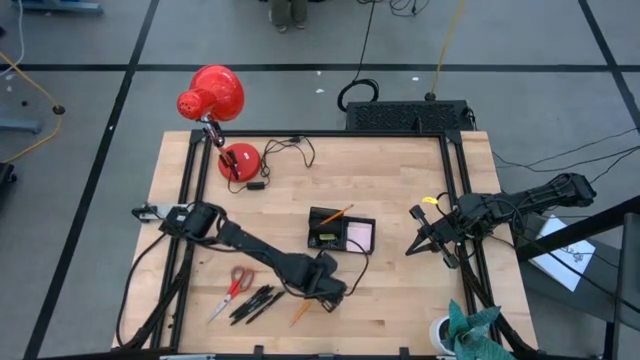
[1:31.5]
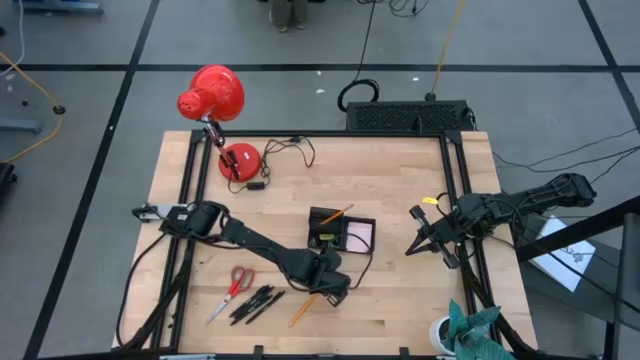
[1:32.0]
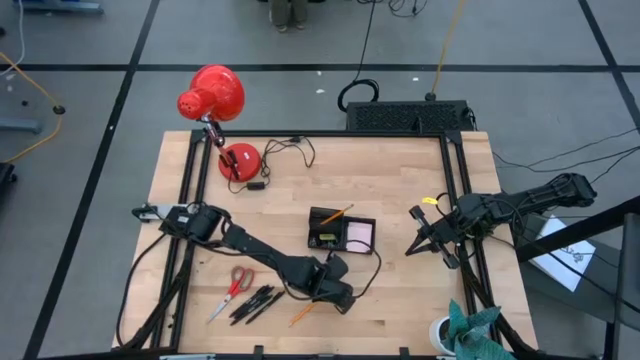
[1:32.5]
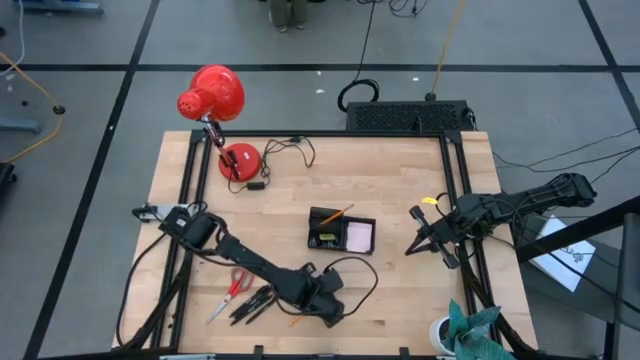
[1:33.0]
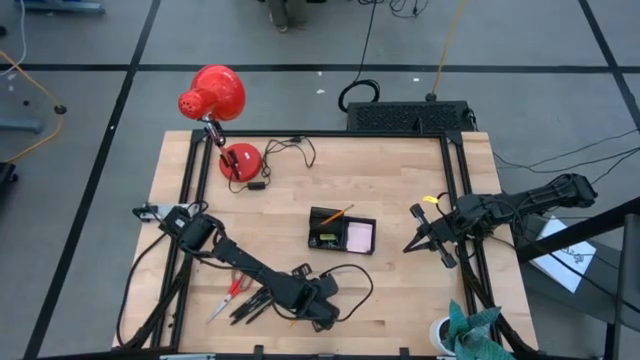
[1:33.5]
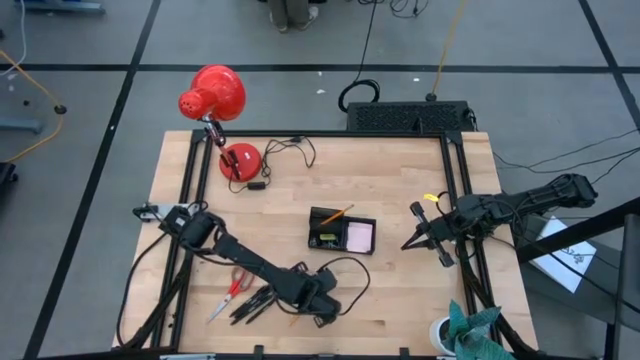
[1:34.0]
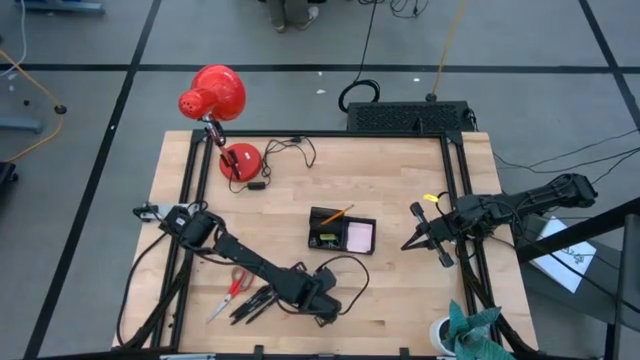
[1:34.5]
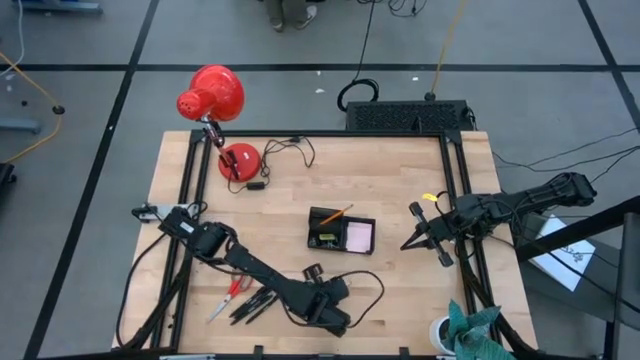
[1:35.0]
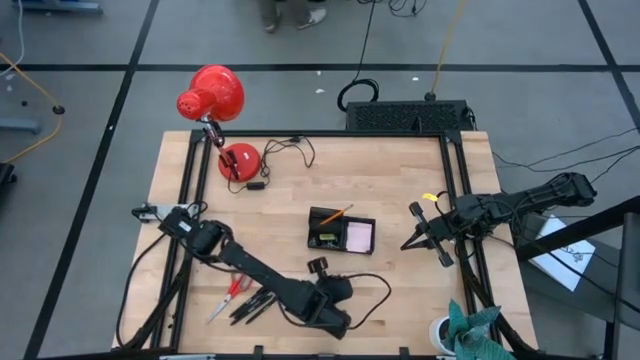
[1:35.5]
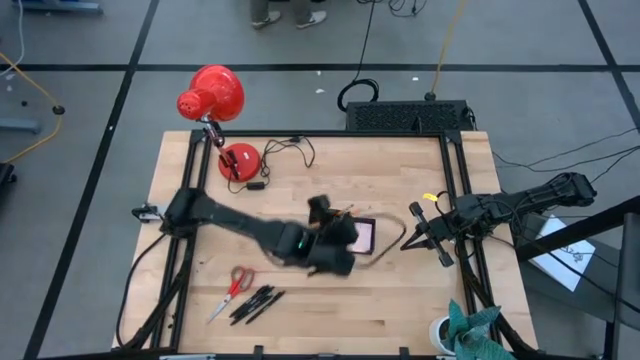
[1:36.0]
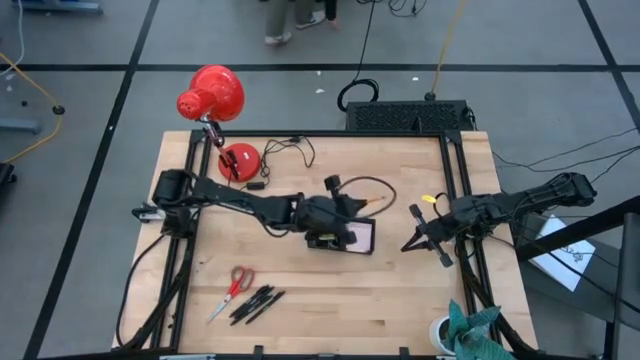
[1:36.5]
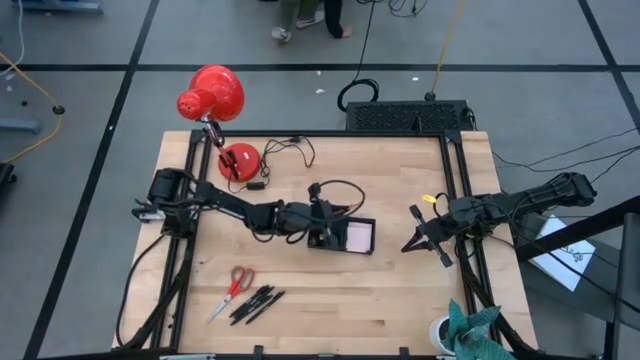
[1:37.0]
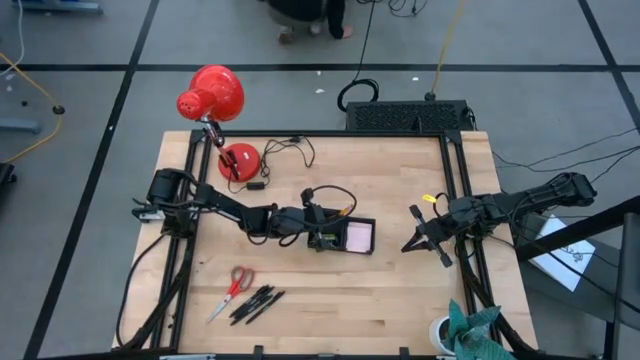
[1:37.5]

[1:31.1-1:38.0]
Task: Pick and place office supplies into organizer
Put the orange pencil into the desk organizer

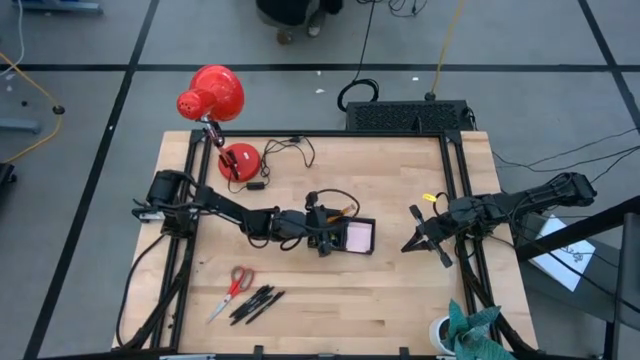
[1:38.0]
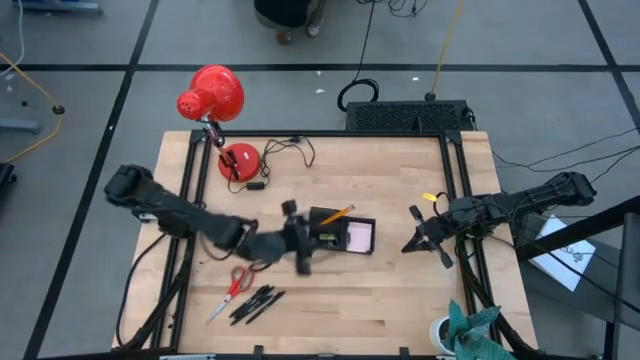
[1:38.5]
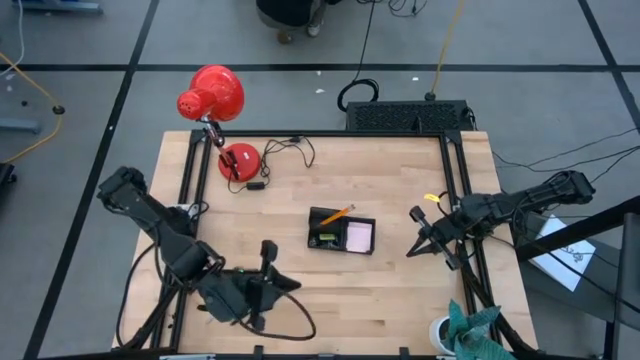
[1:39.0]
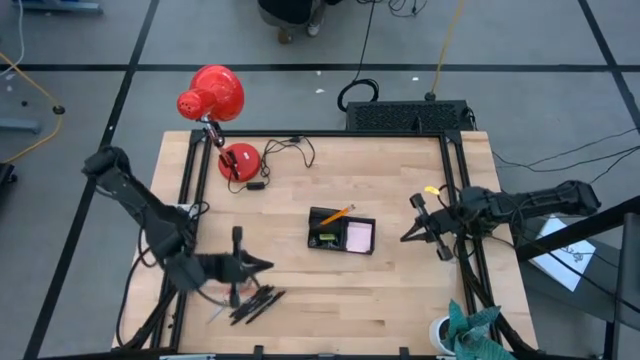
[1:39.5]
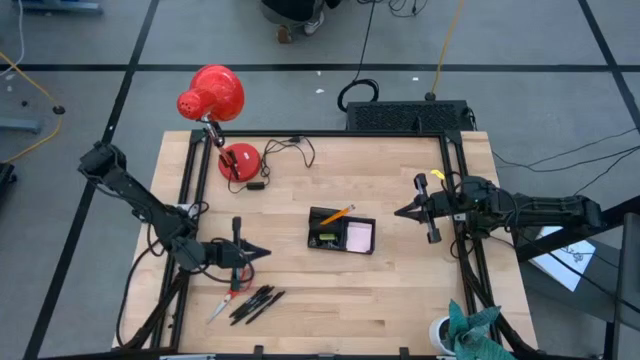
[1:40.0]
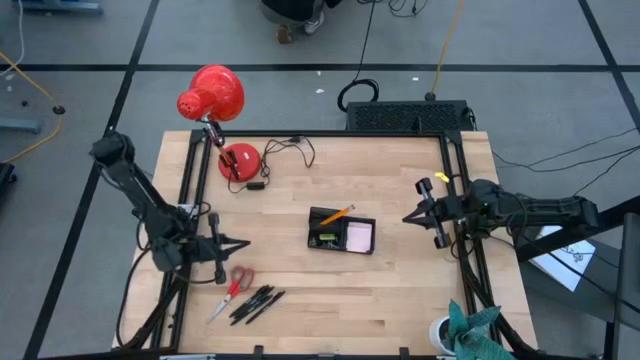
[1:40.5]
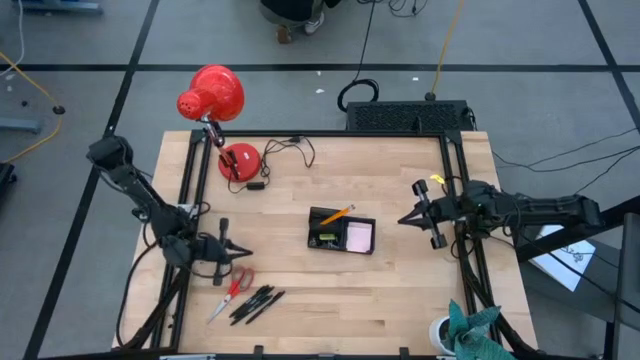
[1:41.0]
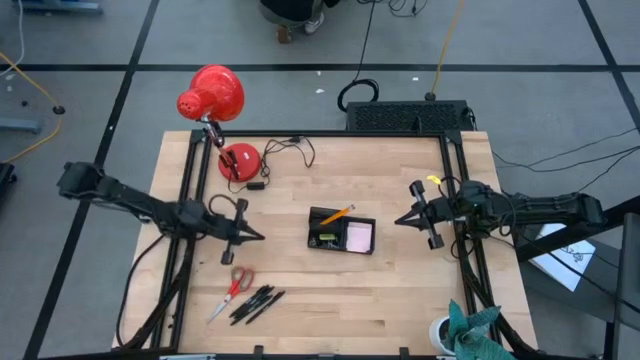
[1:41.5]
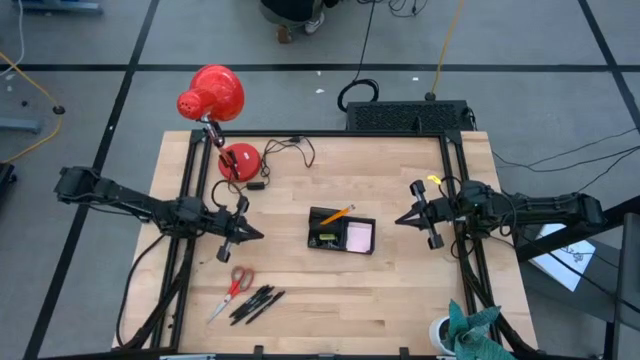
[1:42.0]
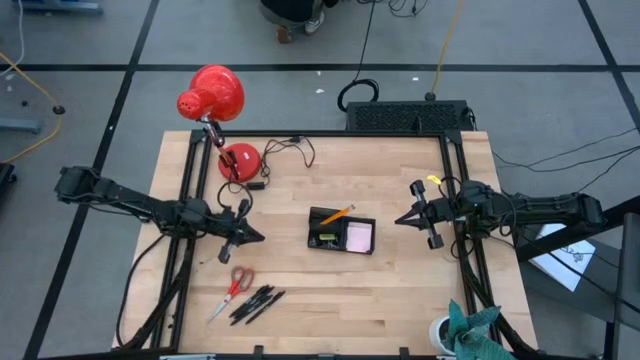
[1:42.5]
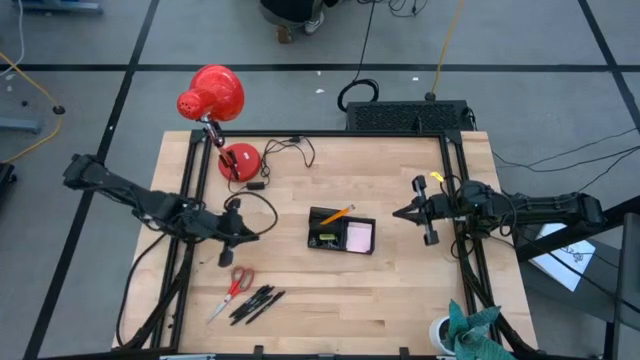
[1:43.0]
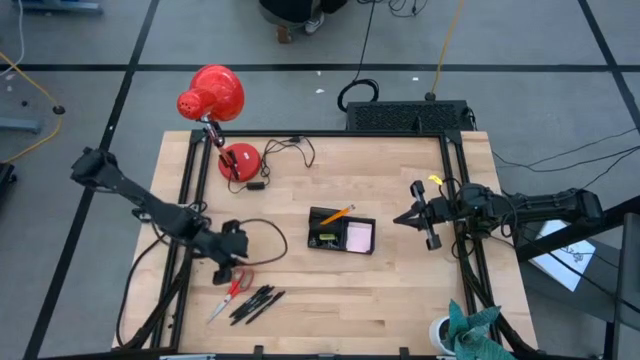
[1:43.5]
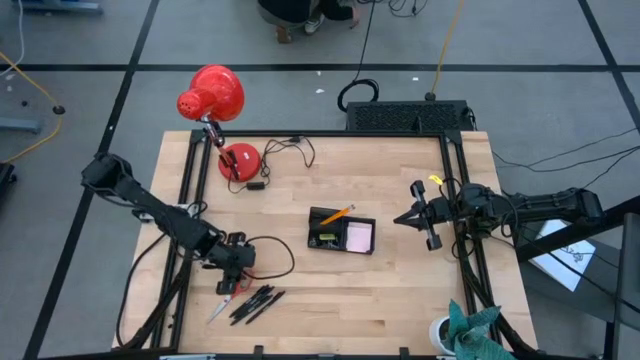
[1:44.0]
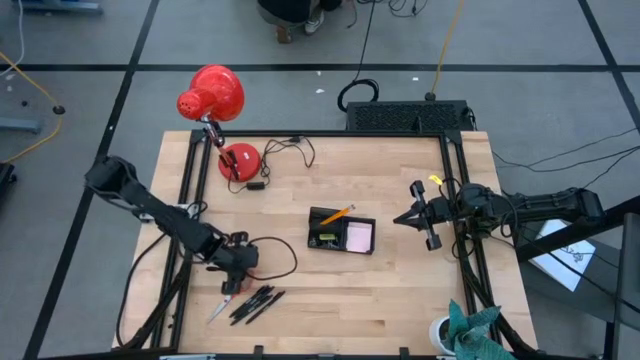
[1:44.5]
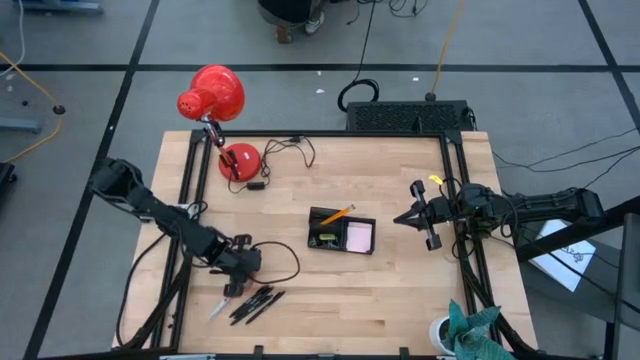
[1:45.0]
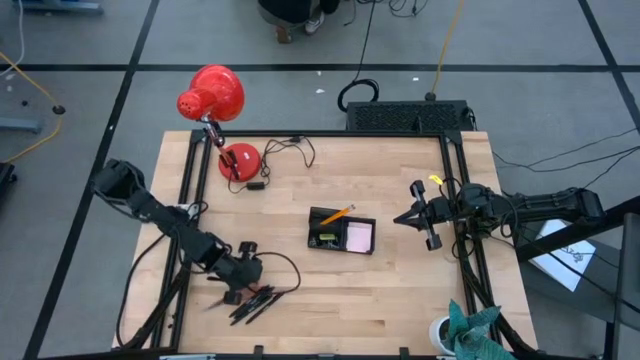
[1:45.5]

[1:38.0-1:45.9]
Put the red scissors into the black desk organizer

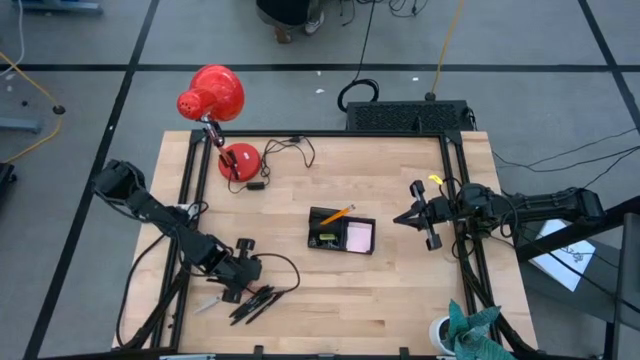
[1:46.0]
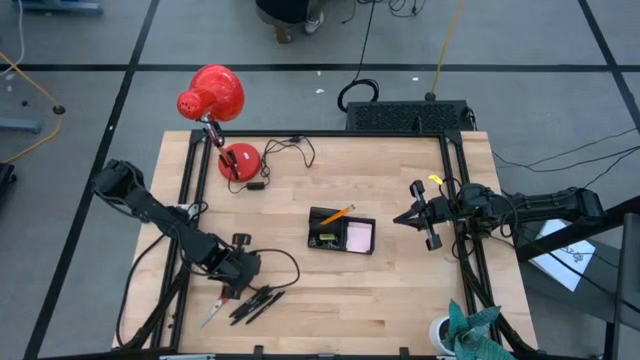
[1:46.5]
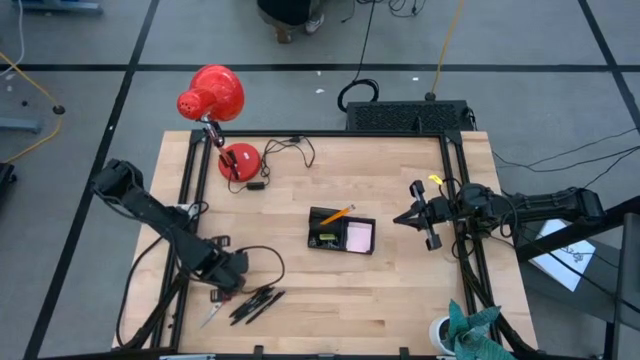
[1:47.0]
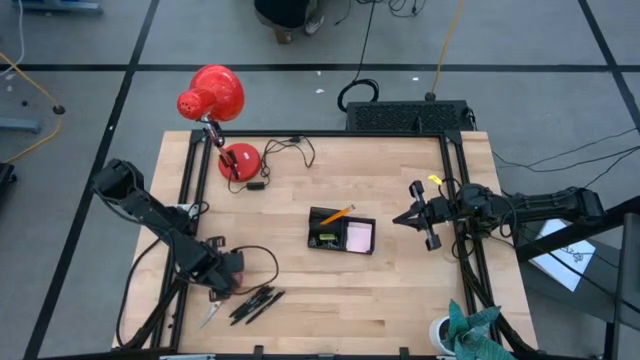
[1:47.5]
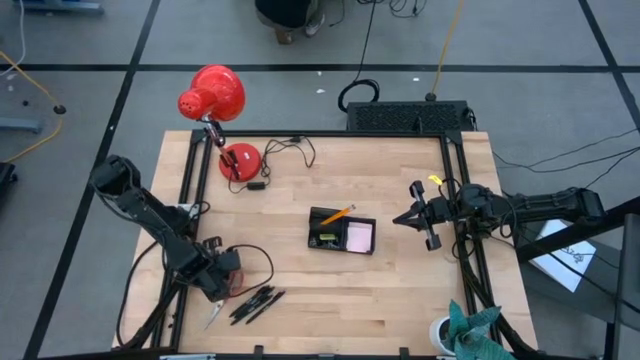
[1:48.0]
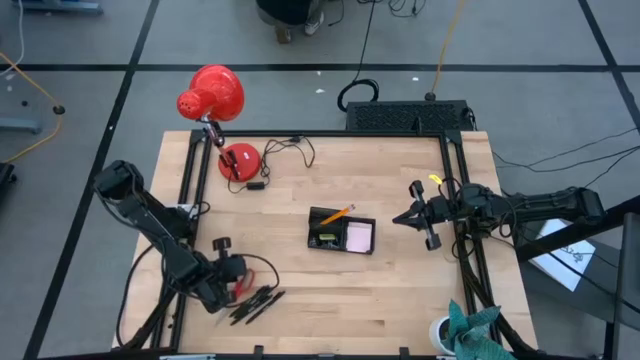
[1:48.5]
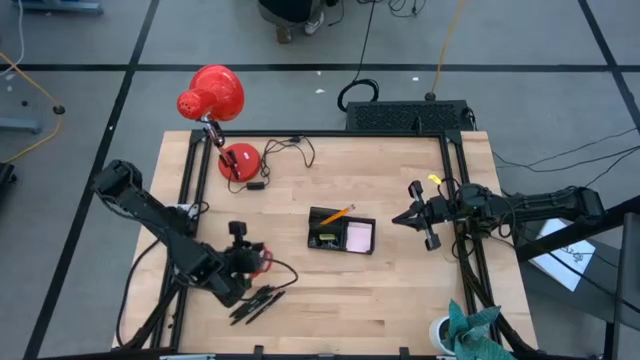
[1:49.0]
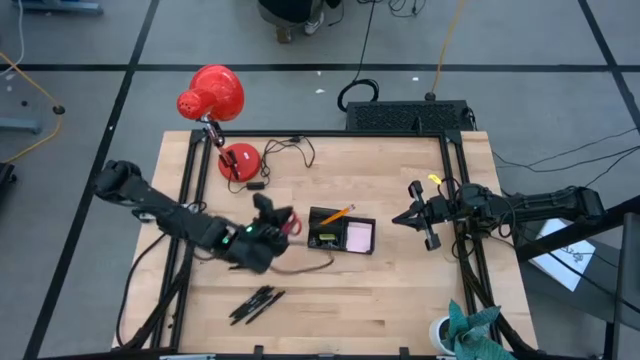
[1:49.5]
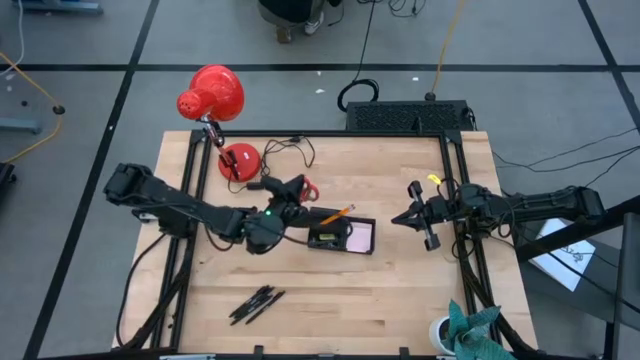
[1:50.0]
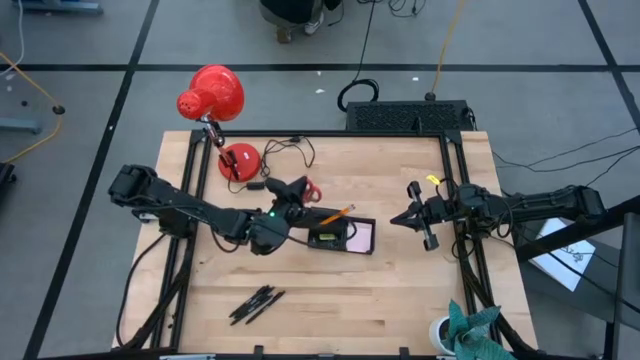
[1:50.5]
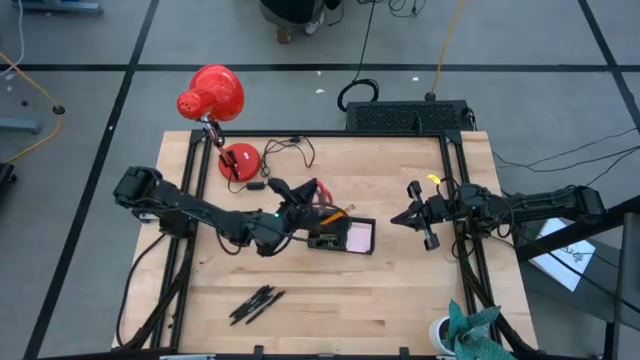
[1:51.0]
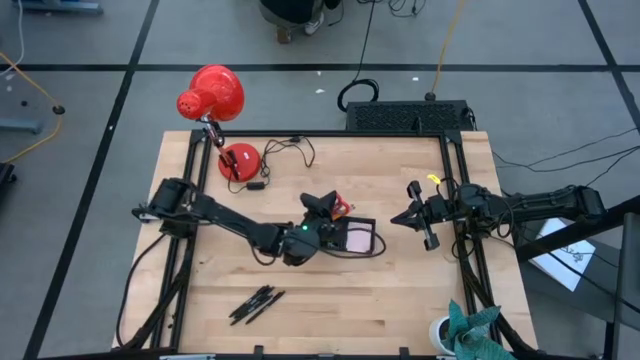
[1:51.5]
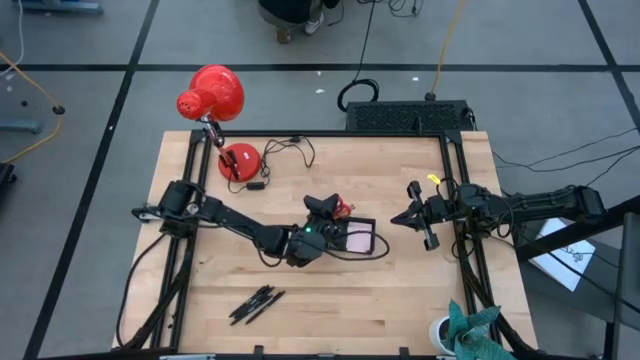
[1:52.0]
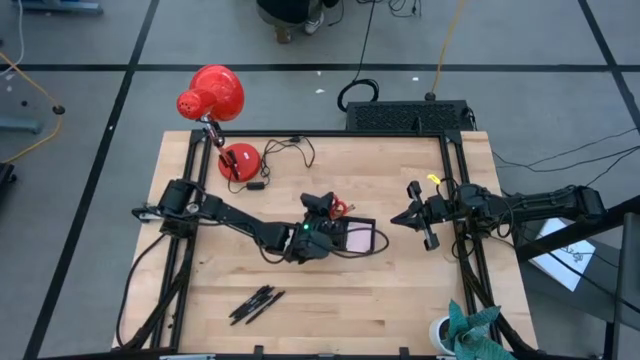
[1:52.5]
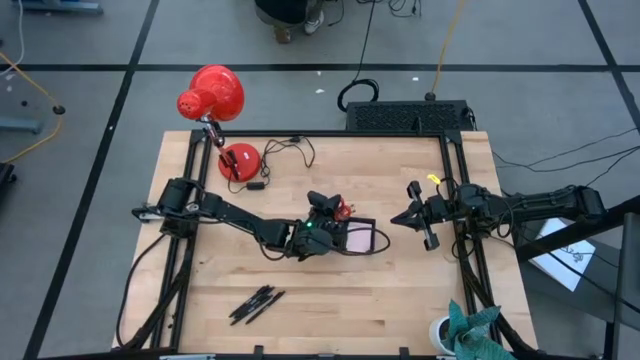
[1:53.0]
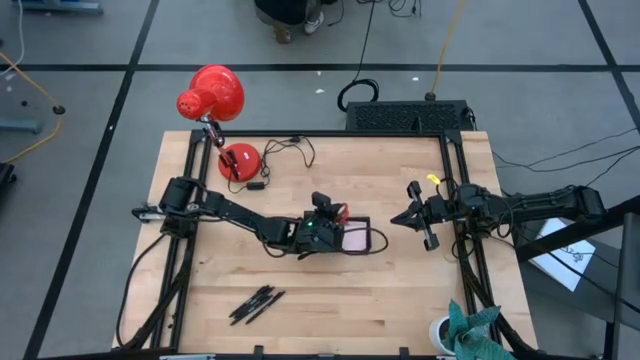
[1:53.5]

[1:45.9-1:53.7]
Put the red scissors into the black desk organizer
